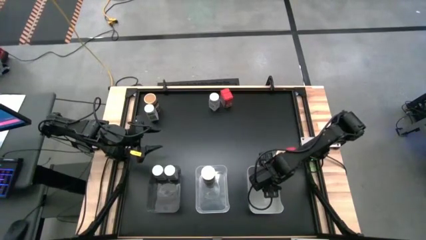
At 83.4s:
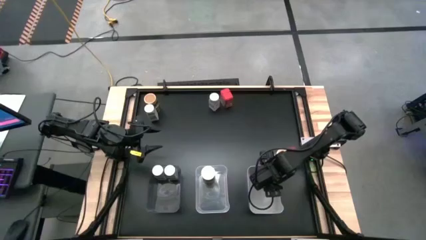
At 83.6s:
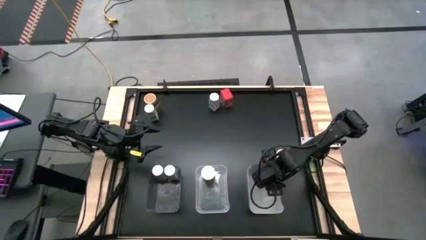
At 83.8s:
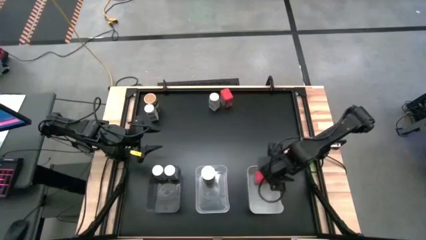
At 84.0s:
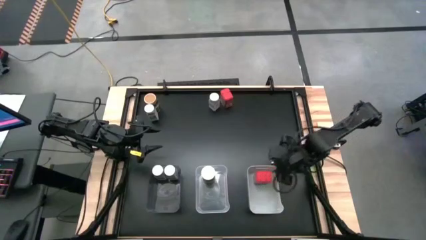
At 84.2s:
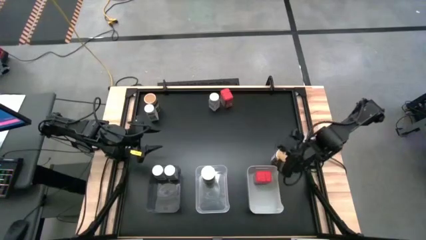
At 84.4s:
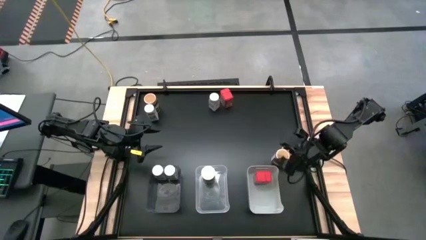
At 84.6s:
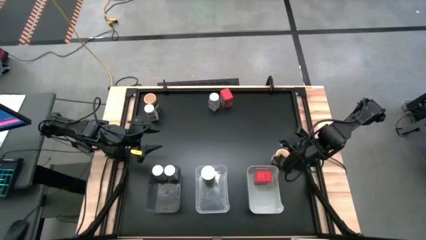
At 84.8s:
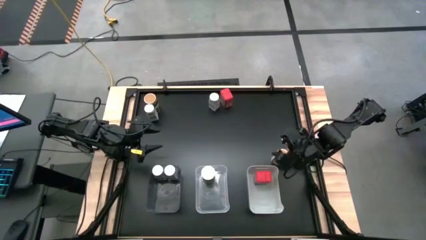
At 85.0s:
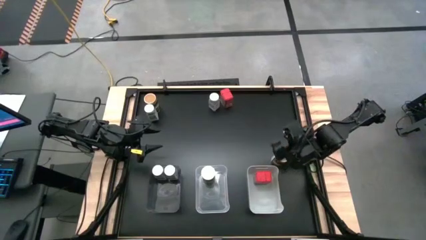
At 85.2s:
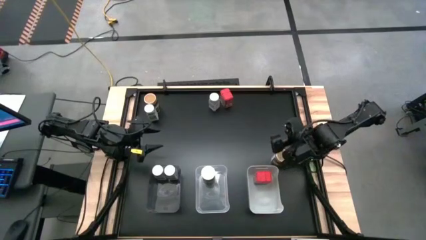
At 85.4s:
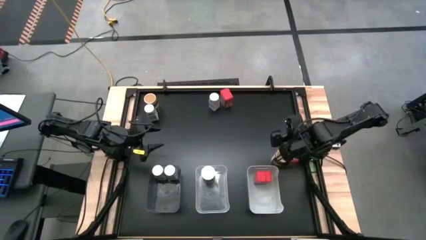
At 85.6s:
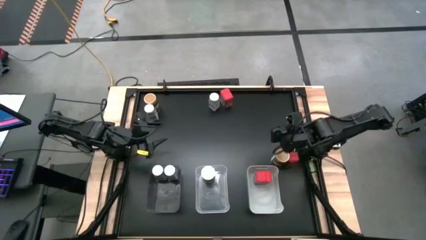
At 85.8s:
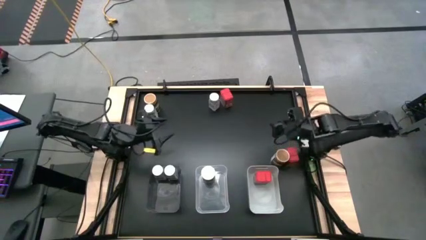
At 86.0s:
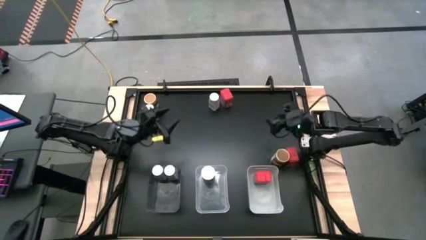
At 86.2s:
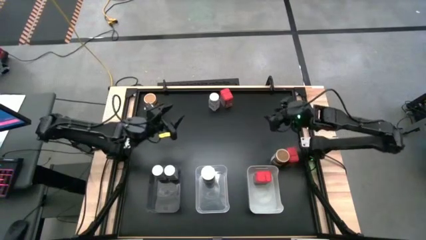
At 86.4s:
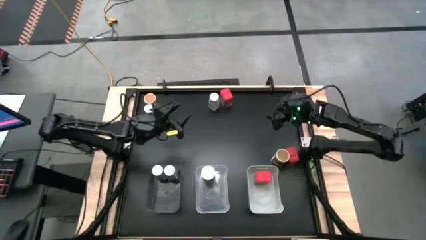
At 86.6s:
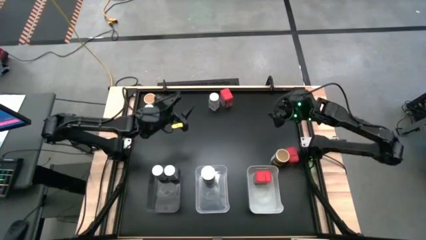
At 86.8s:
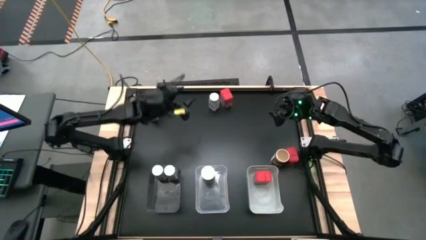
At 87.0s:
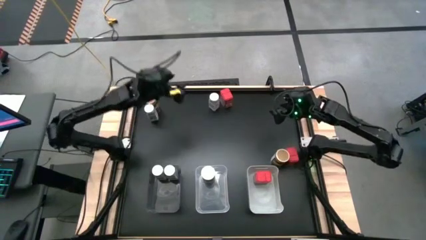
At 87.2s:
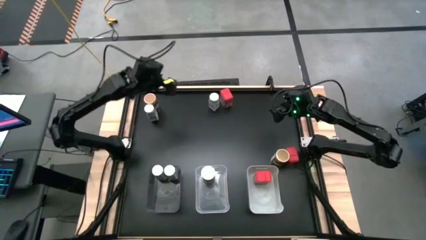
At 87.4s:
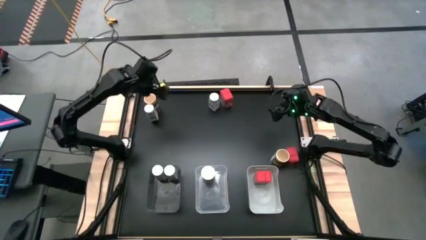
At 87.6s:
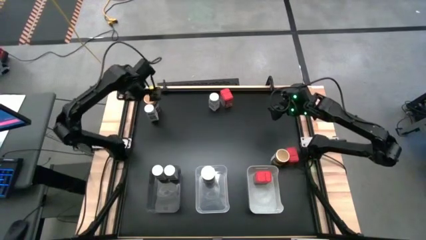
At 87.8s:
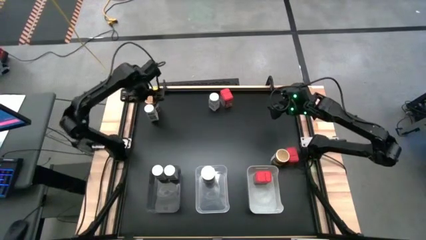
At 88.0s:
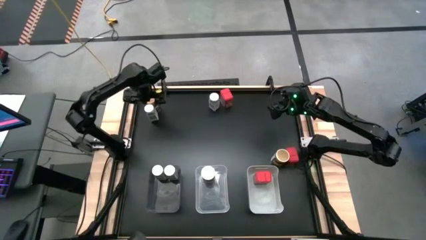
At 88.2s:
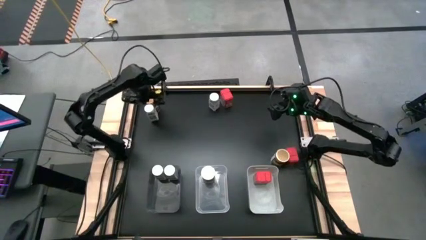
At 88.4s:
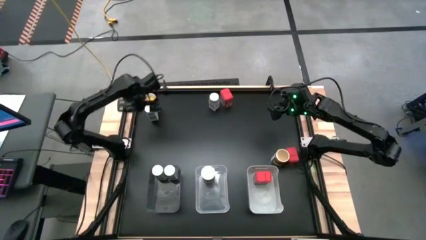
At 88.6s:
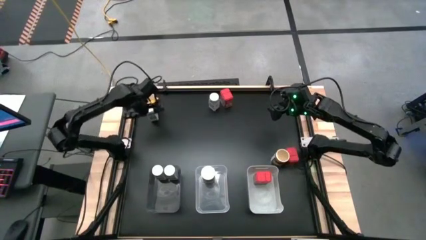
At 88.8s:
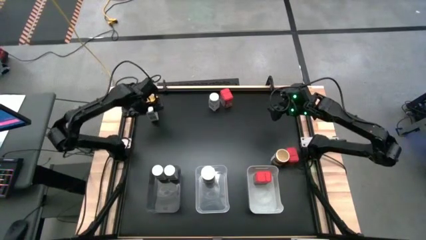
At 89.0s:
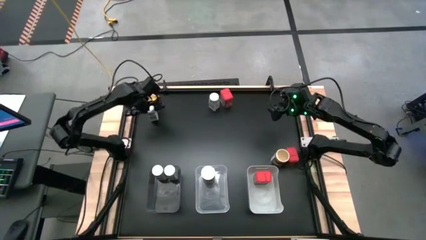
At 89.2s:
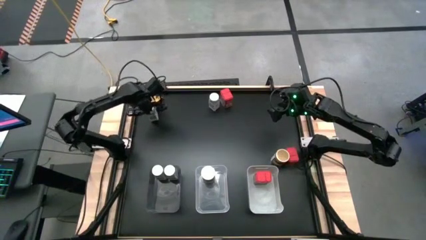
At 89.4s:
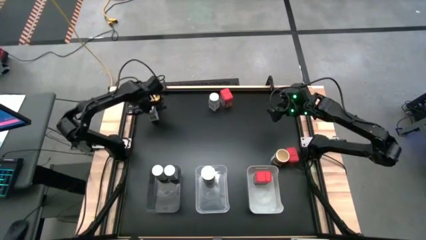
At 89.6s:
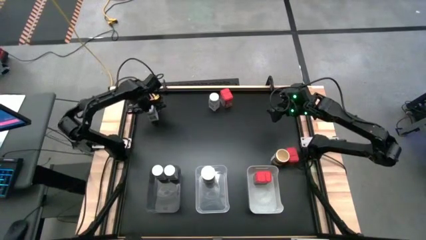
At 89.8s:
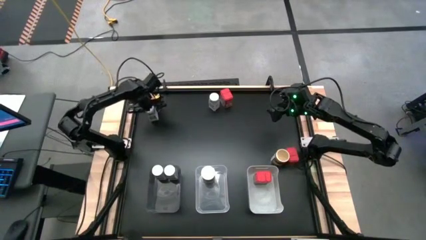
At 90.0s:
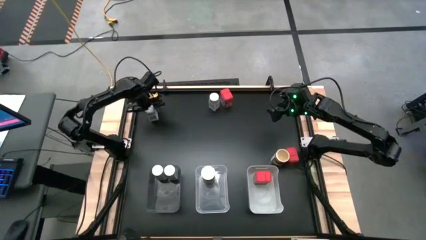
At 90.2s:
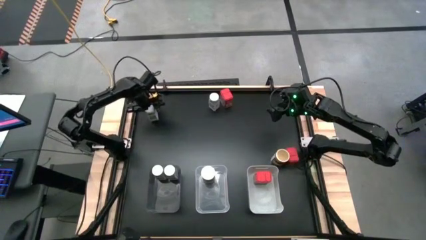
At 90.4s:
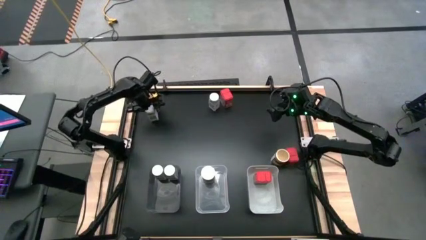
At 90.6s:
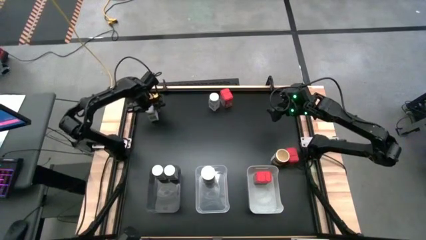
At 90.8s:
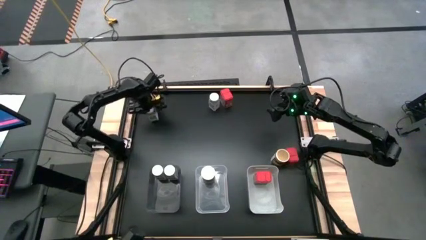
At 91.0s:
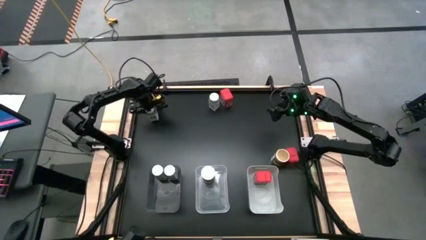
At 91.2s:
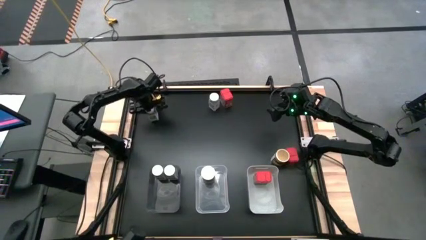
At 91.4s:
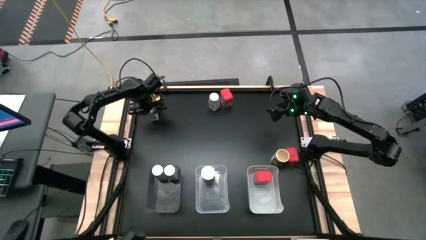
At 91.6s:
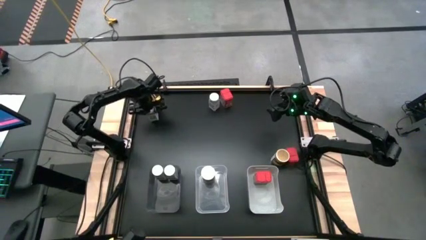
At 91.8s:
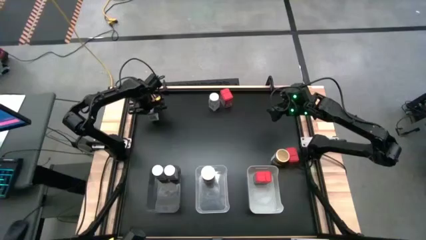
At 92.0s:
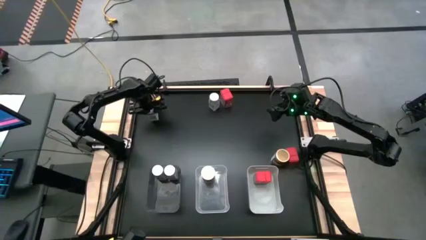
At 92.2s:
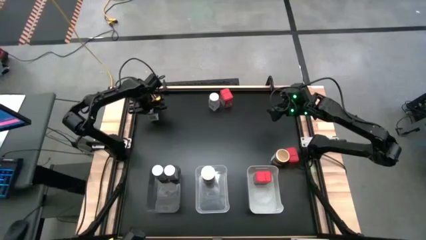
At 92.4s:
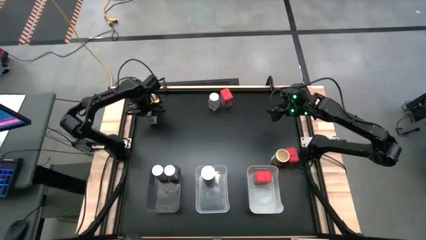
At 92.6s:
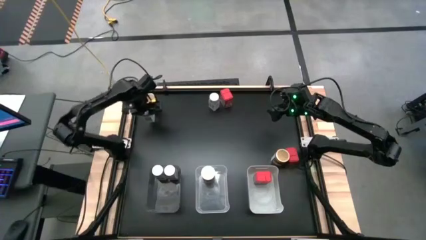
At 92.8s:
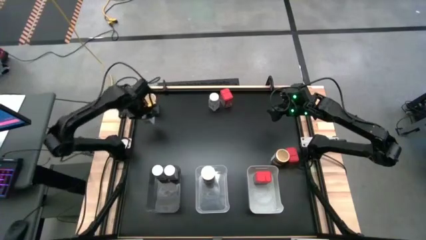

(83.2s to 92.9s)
Task: Sort spices by type
Put the left white seasoning bottle into the black bin

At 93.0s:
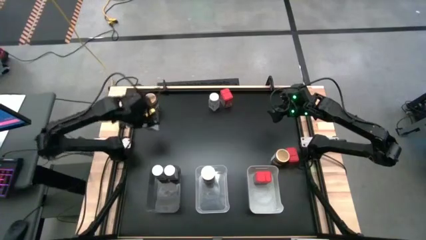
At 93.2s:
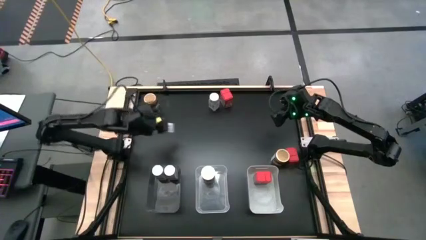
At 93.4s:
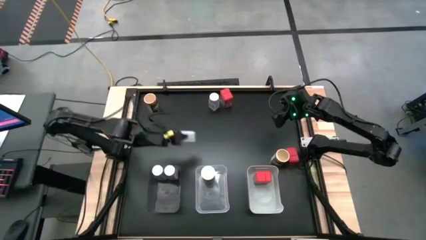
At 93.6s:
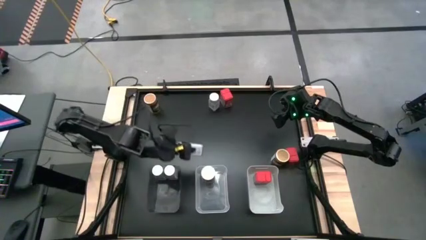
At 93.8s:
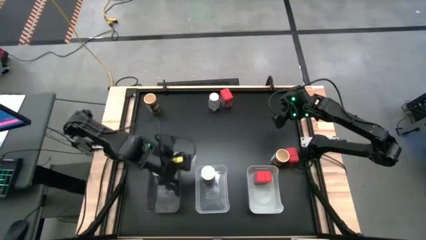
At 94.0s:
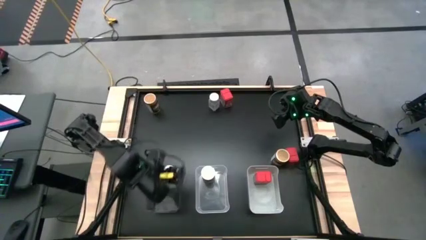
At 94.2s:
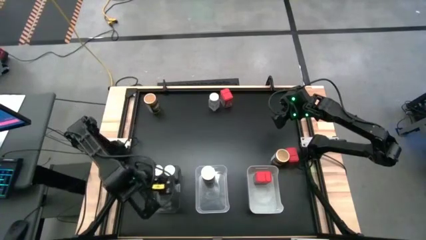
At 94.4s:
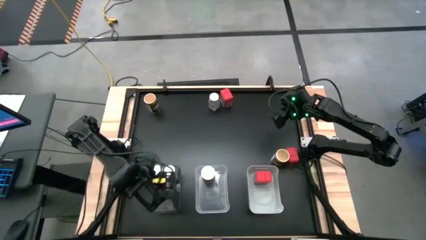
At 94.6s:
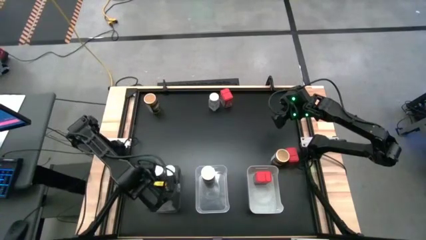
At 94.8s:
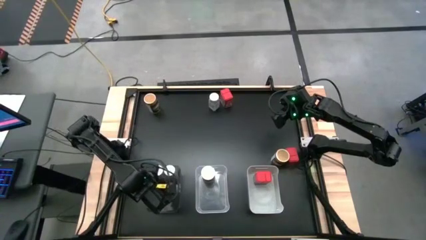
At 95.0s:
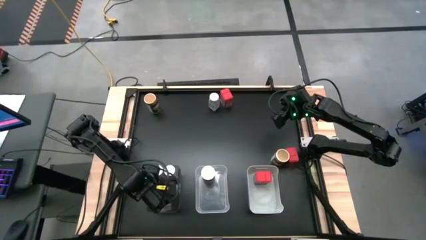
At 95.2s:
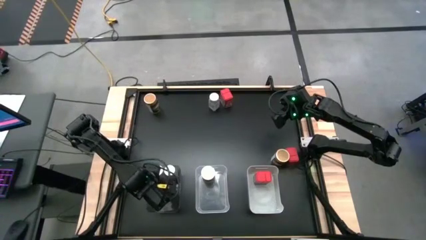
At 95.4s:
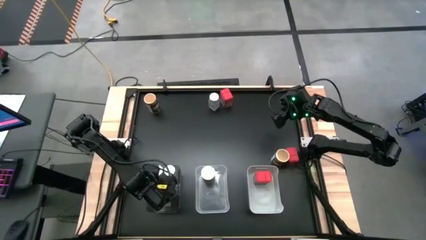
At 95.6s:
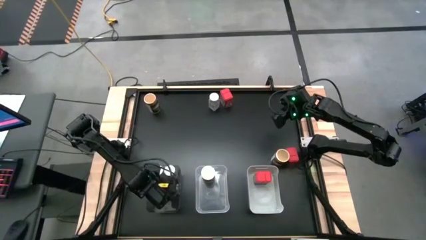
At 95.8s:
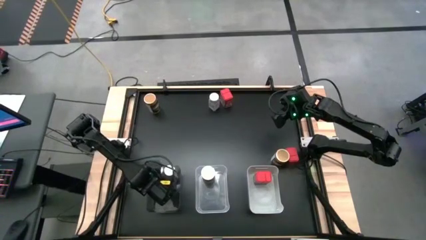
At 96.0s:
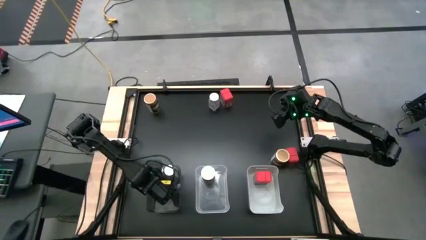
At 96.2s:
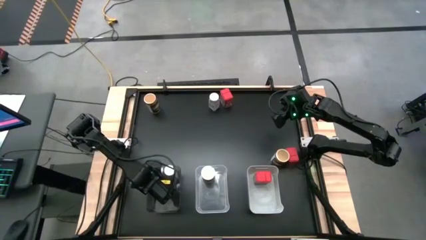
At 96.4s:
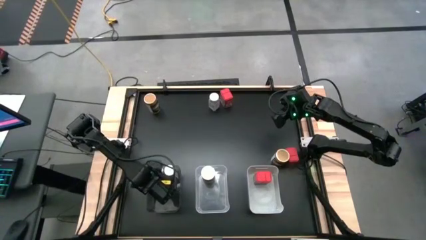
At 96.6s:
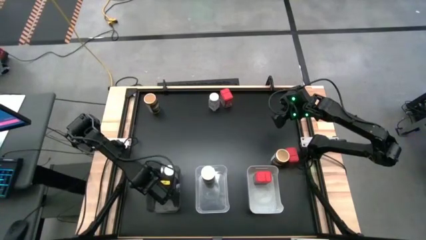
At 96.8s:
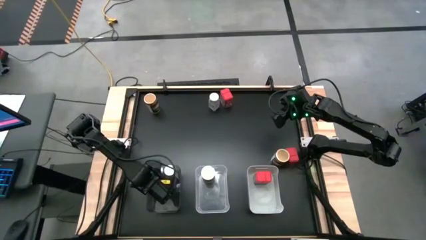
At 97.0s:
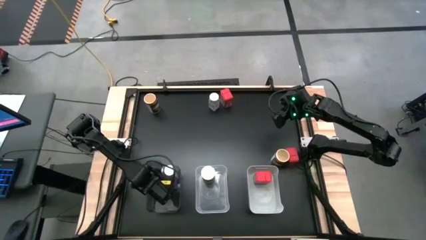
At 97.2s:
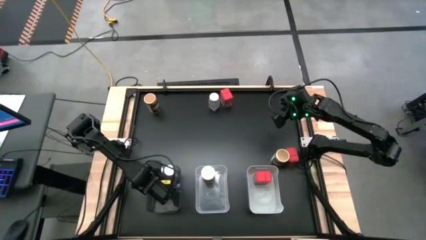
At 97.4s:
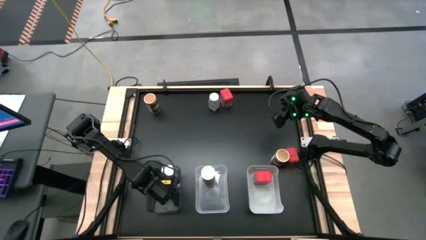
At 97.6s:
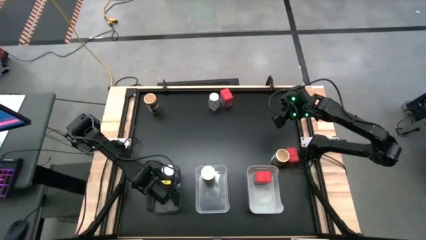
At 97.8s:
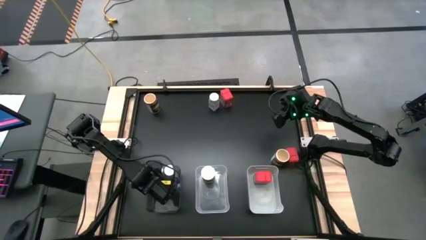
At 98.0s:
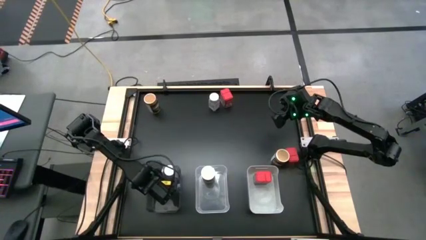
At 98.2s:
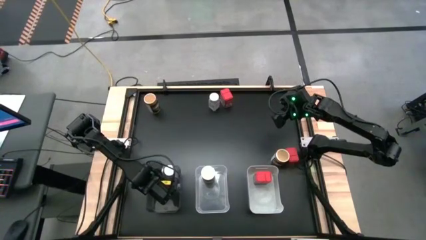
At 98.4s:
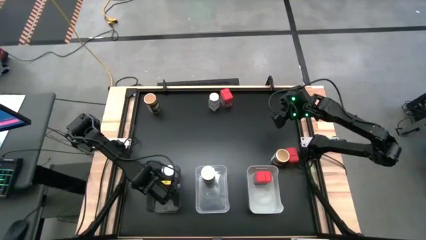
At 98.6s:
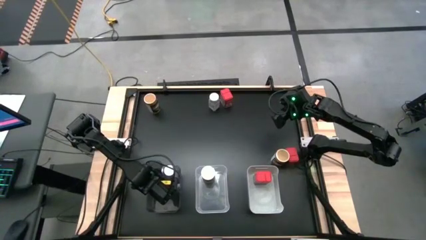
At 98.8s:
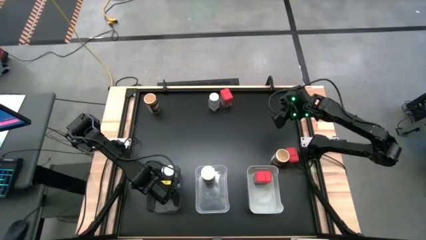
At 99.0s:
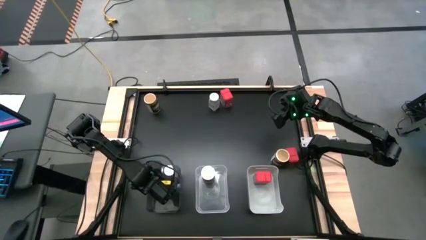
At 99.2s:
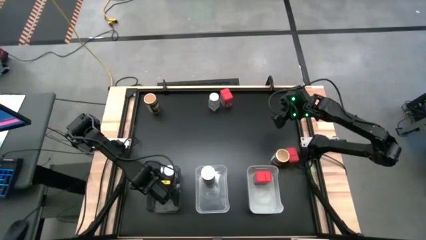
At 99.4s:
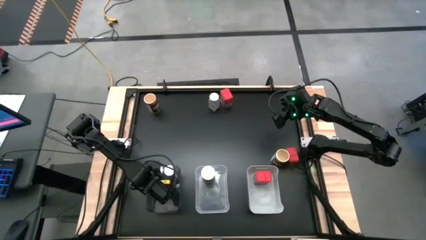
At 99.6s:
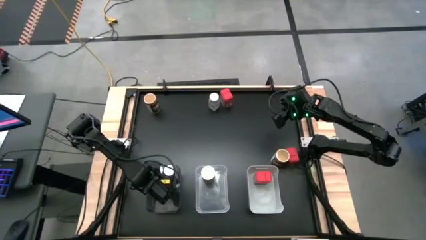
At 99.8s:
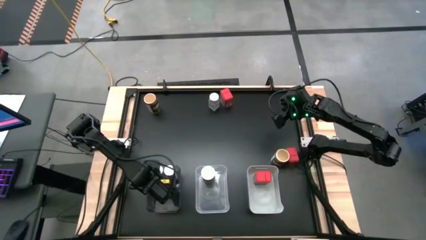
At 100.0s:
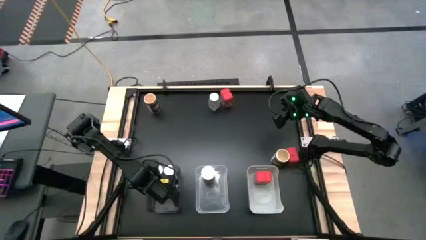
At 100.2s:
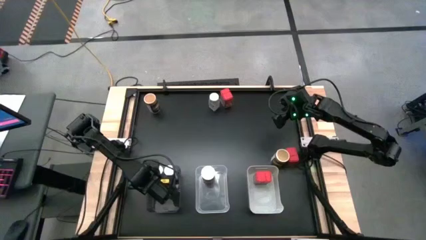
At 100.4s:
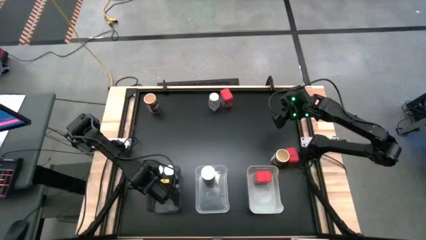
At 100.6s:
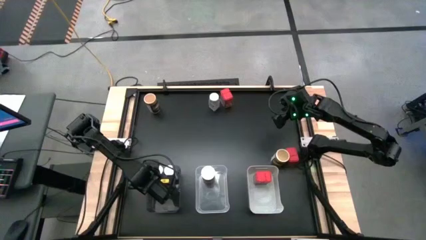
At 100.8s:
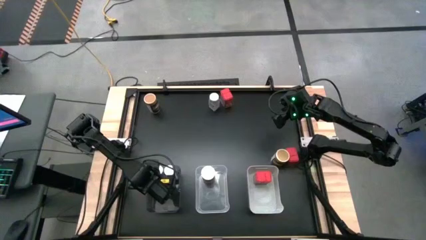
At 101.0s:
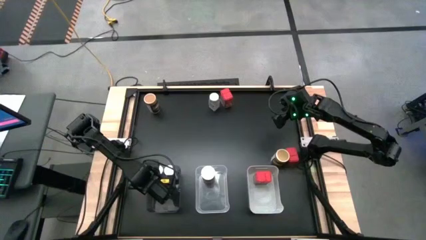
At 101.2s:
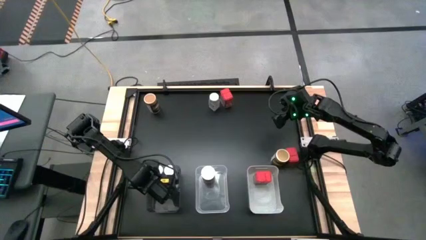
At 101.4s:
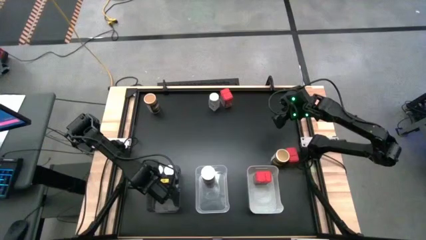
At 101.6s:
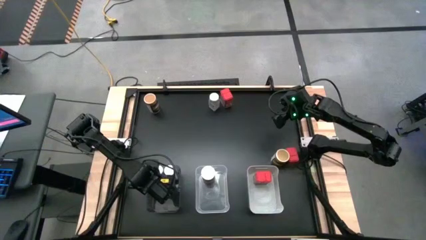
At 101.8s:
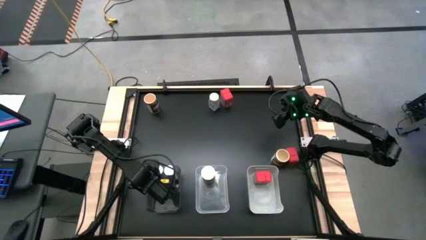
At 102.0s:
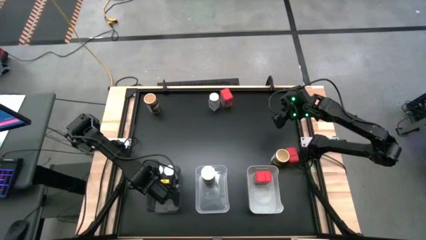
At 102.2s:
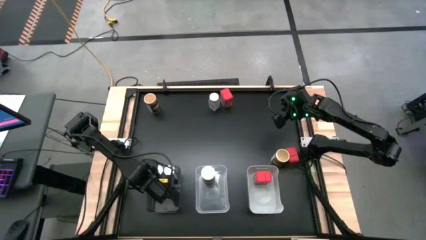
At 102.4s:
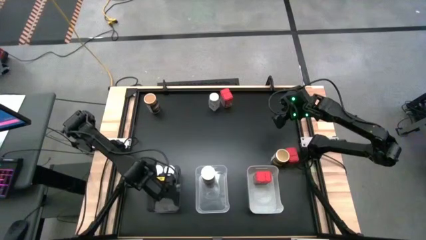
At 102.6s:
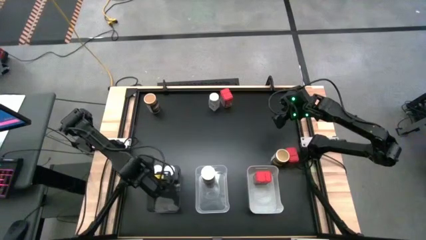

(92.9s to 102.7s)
Put the left white seasoning bottle into the black bin
